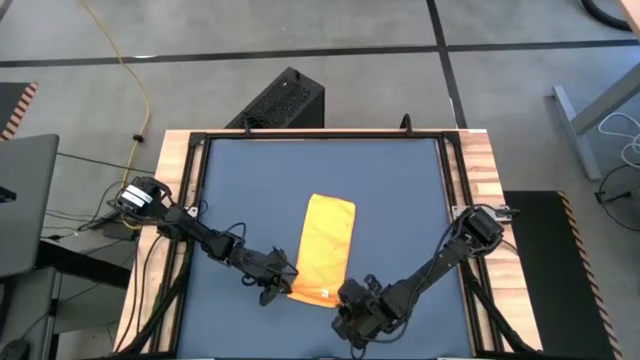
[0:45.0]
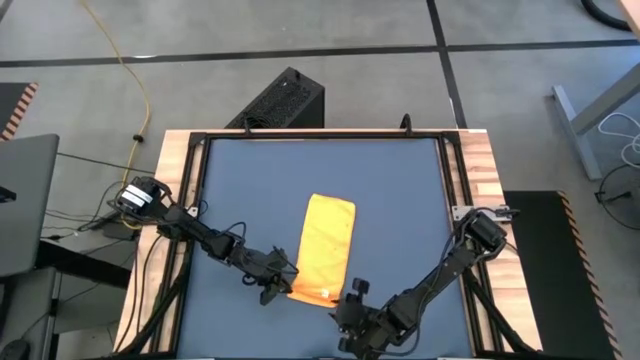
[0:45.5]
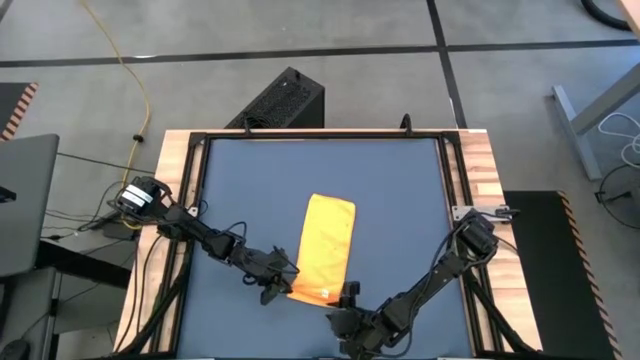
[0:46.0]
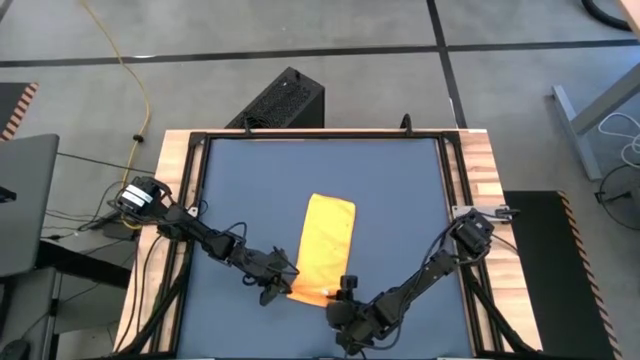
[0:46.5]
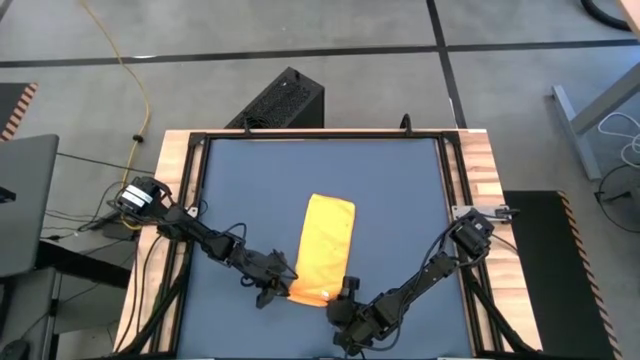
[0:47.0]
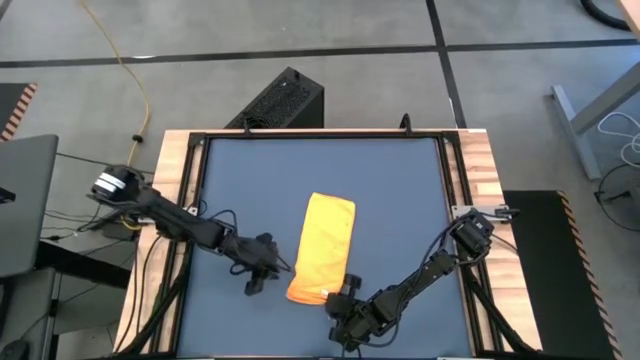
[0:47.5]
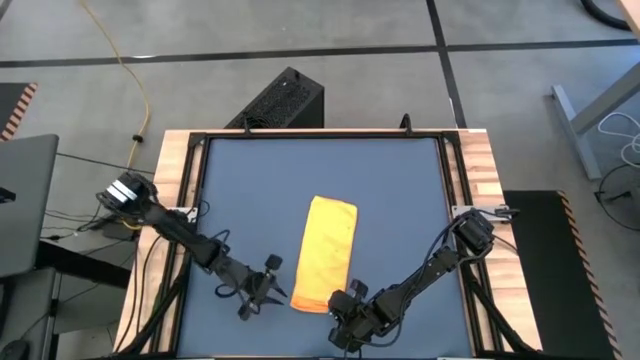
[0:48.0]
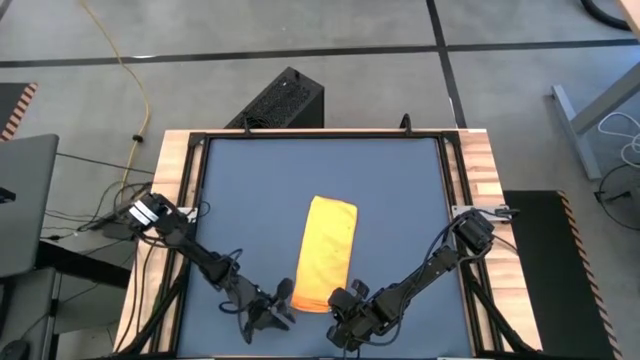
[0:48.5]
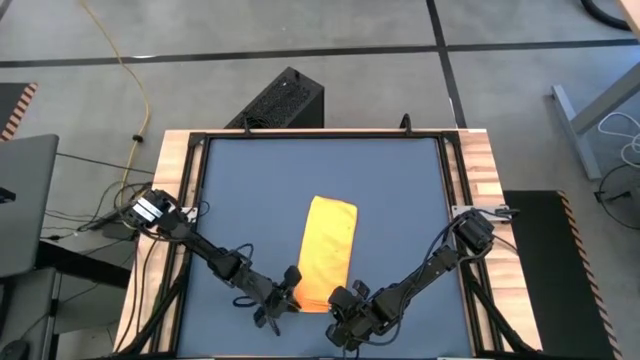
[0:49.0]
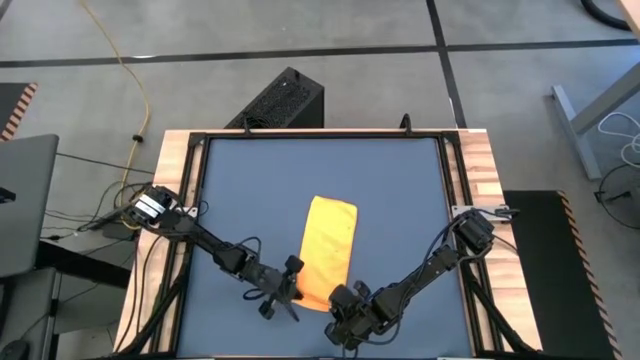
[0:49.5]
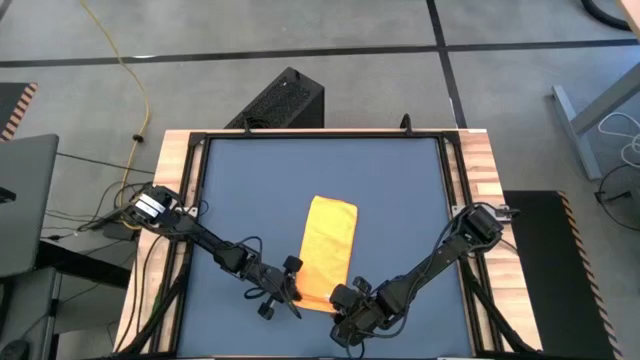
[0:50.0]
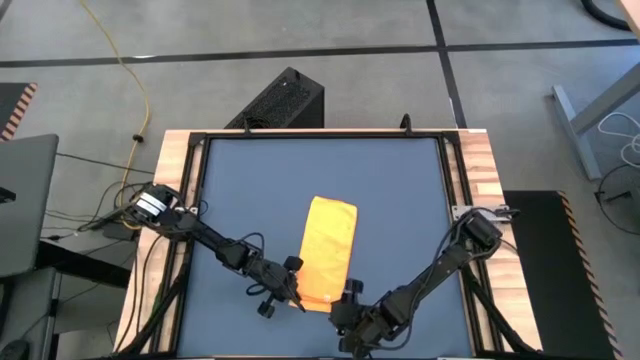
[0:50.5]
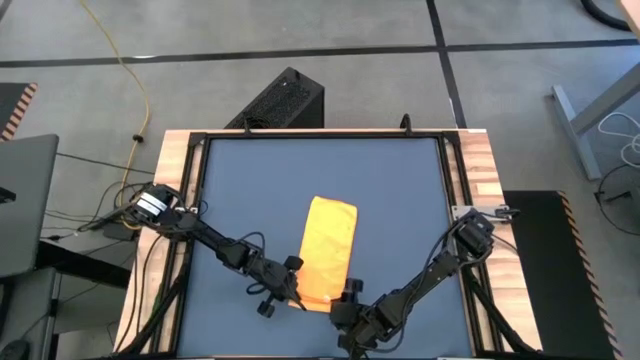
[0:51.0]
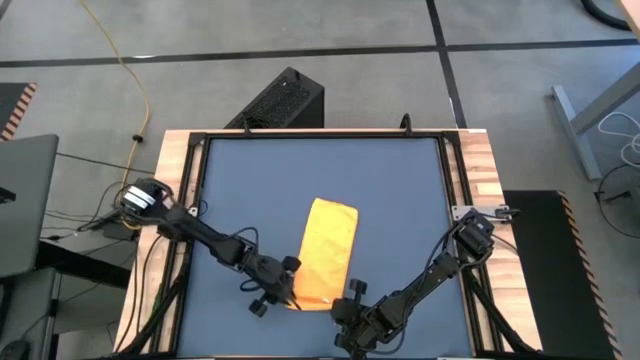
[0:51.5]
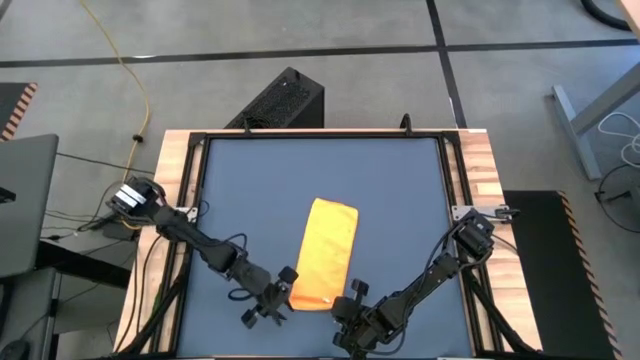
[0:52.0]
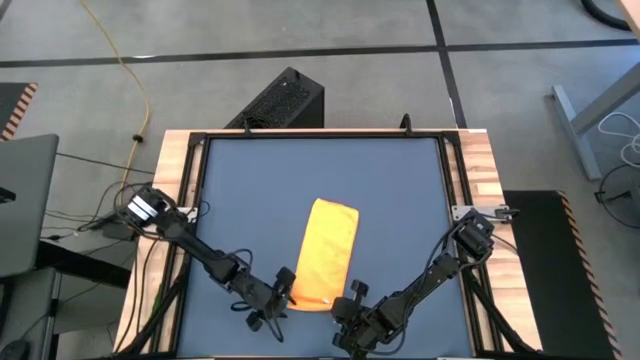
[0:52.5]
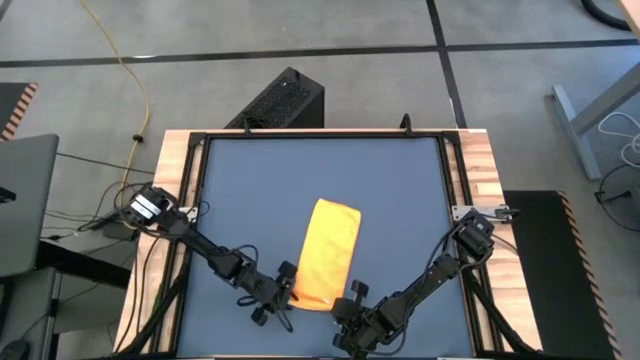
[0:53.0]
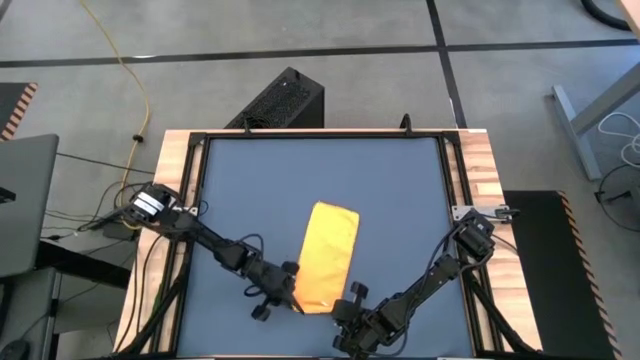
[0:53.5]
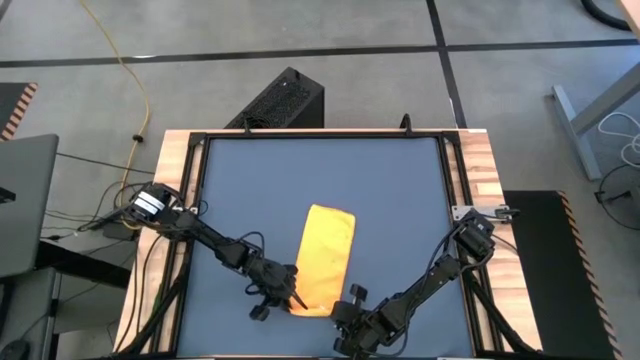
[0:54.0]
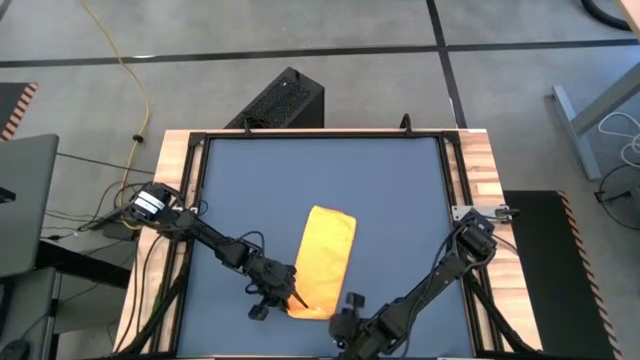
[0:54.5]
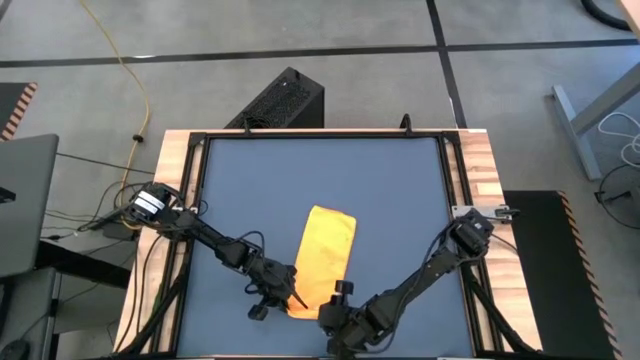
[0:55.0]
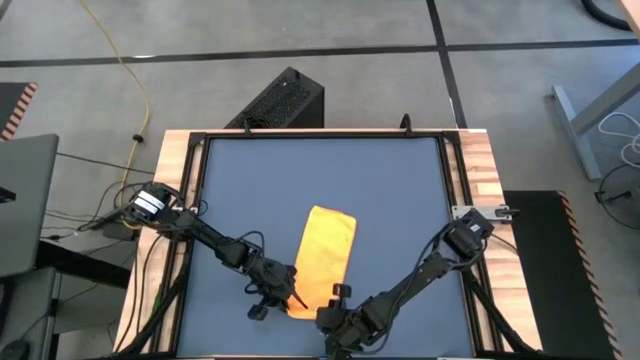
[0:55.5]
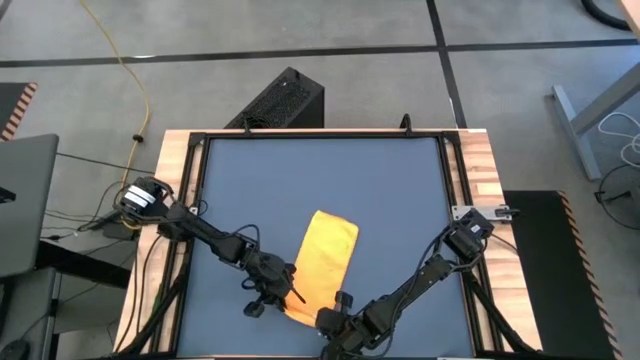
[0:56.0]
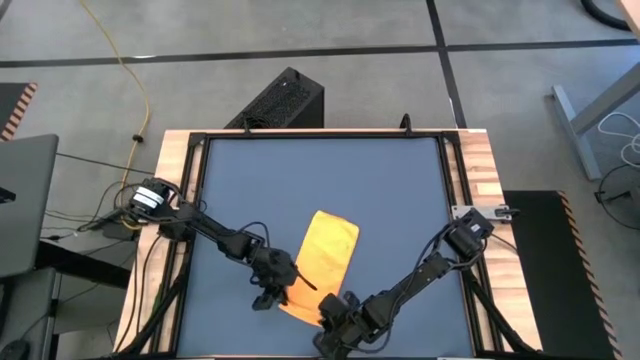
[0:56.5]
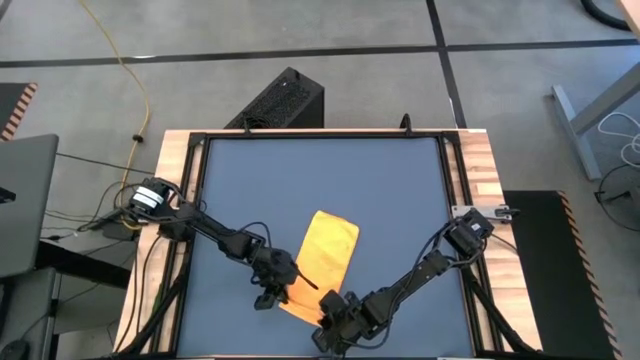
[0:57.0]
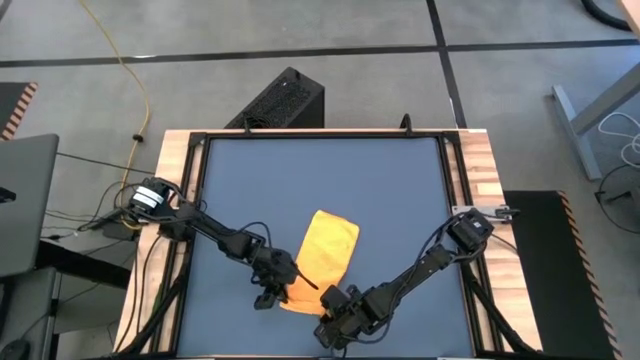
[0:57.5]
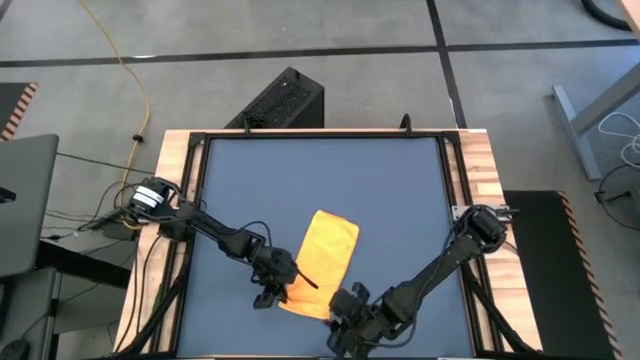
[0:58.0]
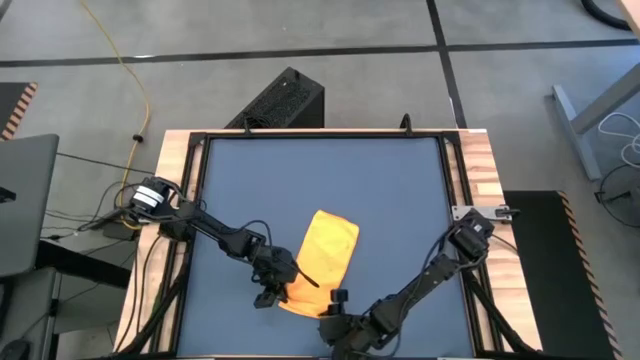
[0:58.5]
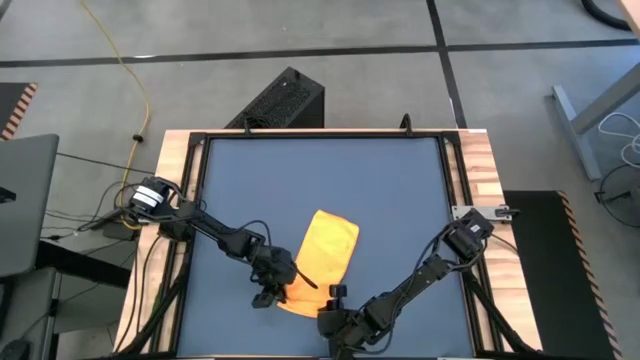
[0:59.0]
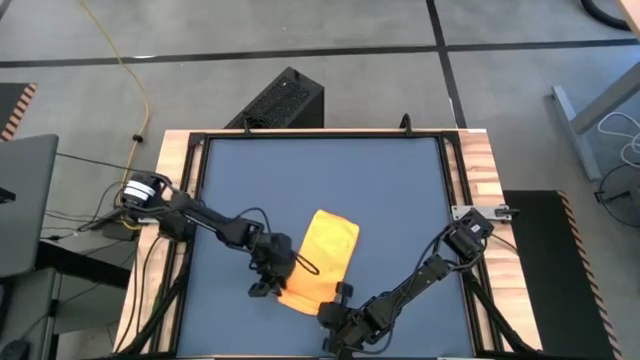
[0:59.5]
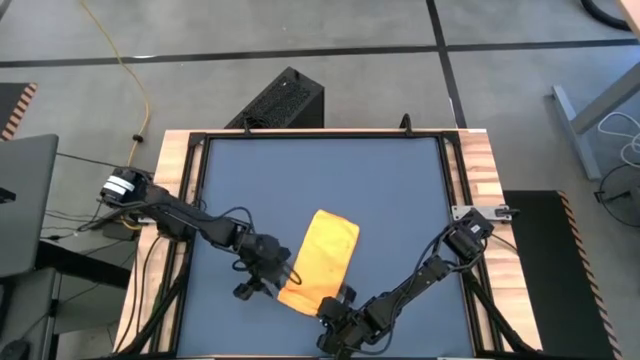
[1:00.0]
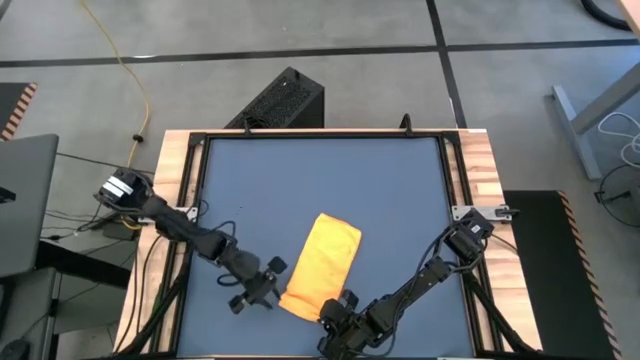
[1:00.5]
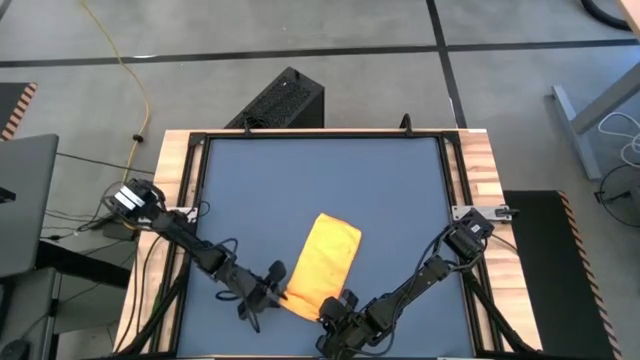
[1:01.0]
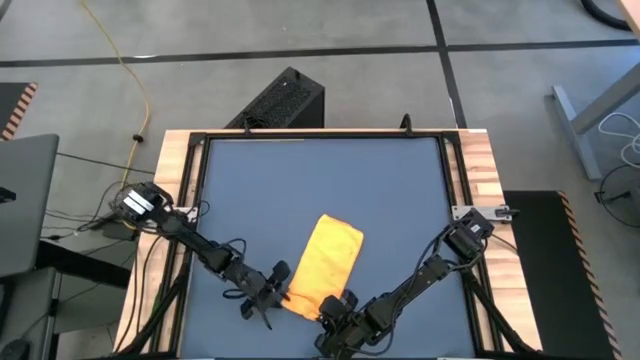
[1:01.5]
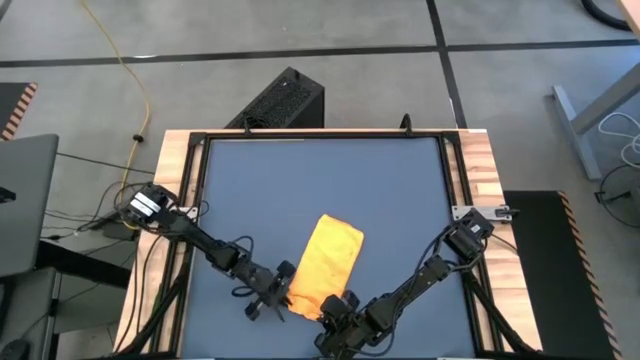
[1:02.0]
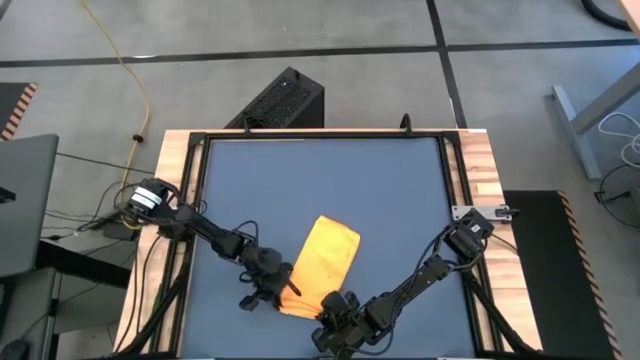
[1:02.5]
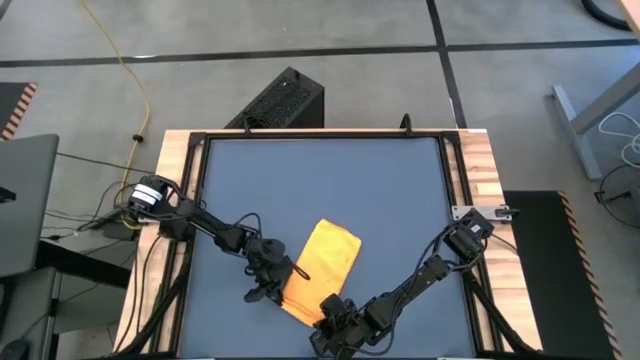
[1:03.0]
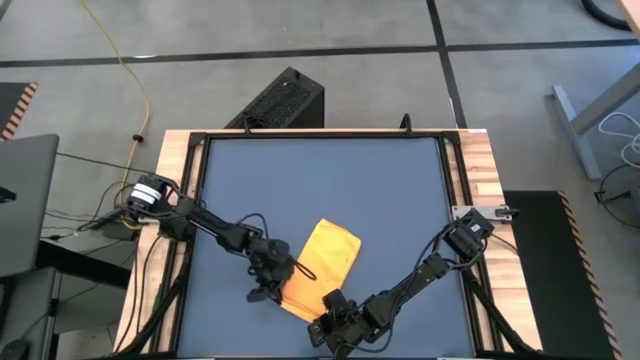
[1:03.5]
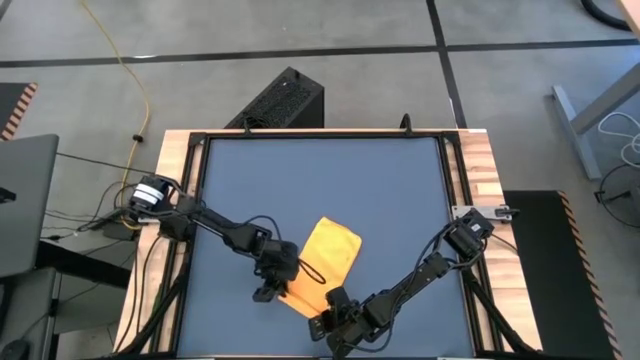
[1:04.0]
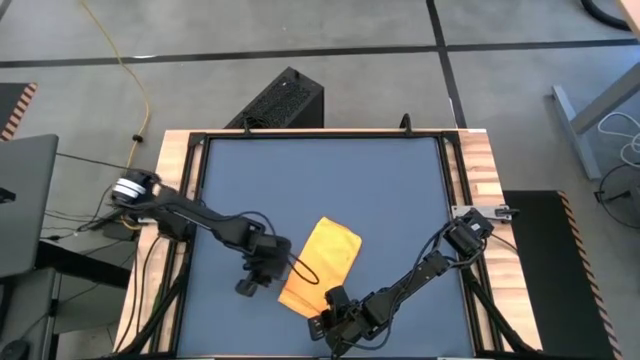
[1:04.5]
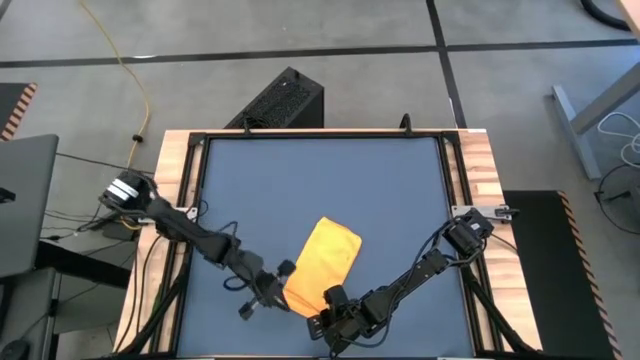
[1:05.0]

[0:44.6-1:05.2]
Task: Roll towel into tight, uniform cylinder
Roll the orange microfiber cloth
